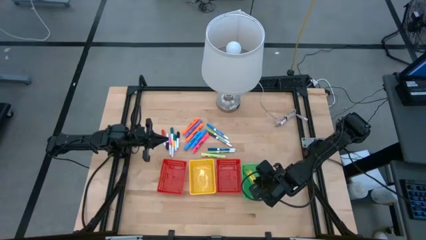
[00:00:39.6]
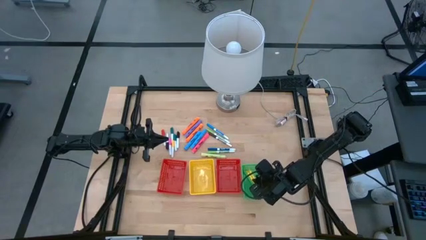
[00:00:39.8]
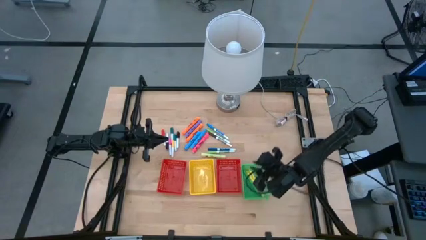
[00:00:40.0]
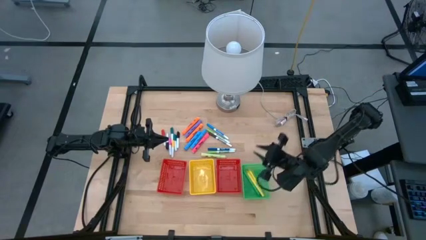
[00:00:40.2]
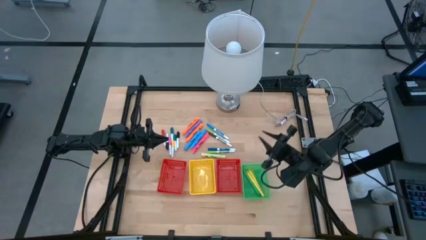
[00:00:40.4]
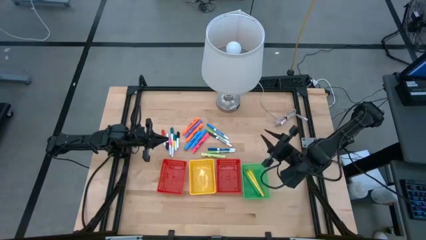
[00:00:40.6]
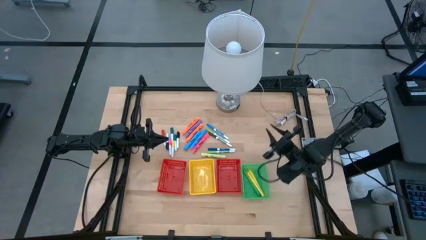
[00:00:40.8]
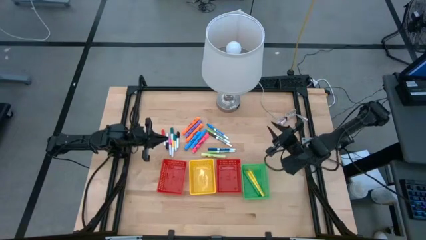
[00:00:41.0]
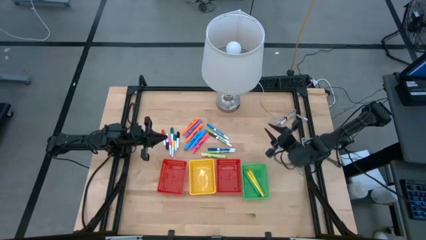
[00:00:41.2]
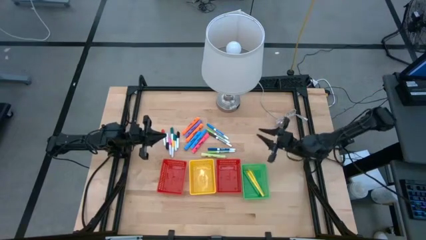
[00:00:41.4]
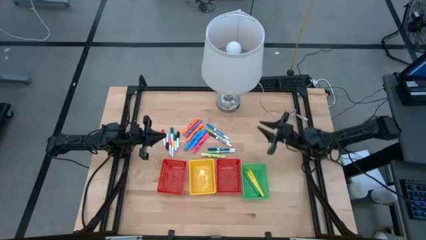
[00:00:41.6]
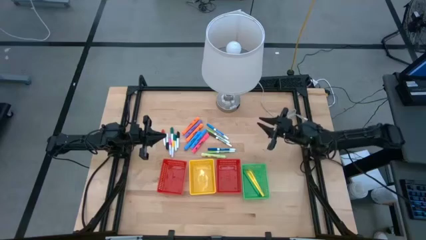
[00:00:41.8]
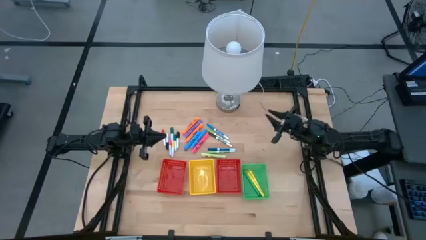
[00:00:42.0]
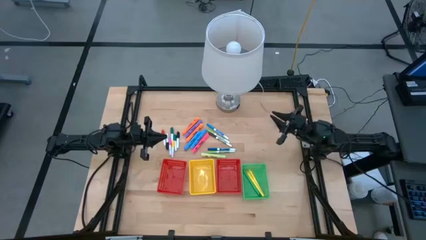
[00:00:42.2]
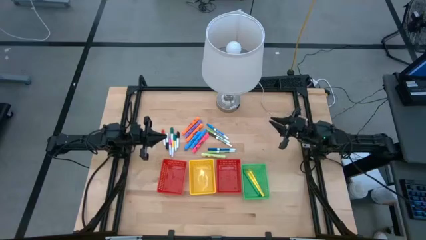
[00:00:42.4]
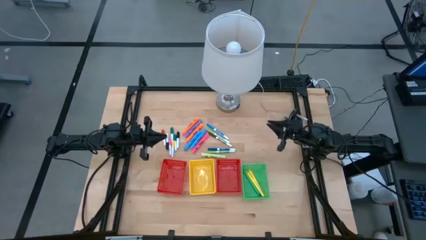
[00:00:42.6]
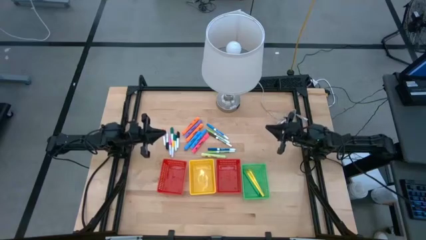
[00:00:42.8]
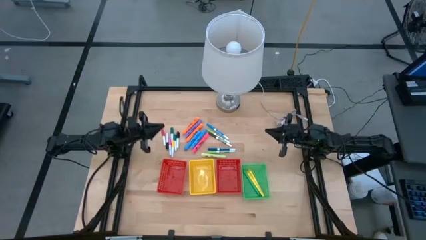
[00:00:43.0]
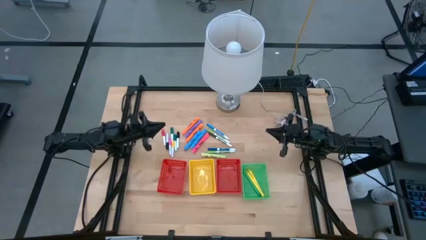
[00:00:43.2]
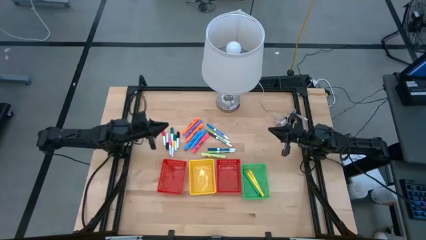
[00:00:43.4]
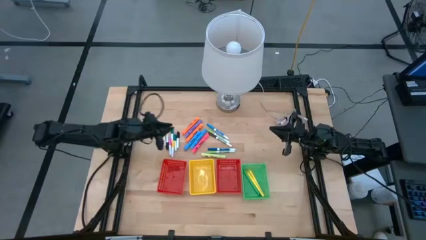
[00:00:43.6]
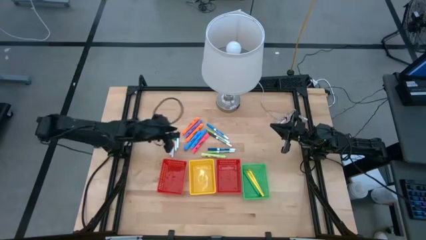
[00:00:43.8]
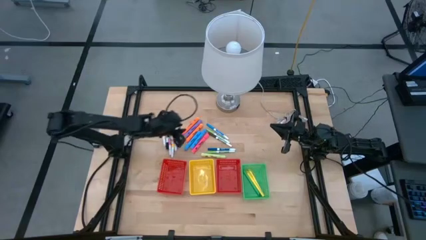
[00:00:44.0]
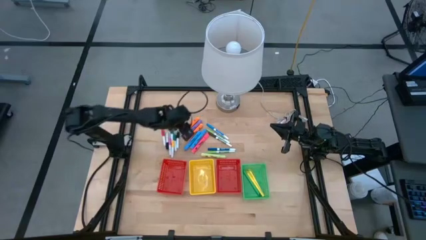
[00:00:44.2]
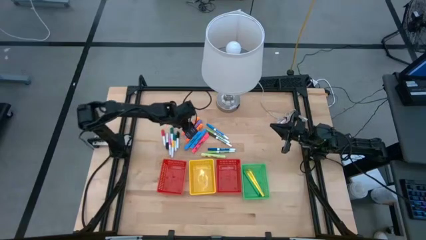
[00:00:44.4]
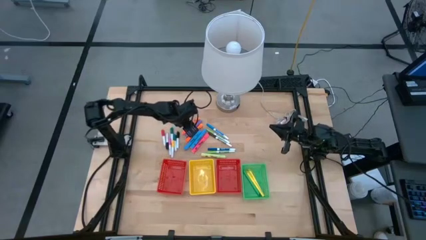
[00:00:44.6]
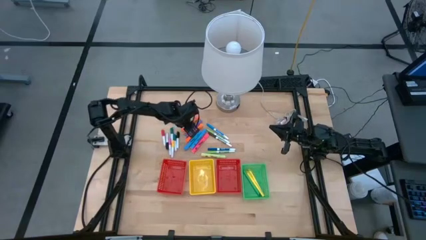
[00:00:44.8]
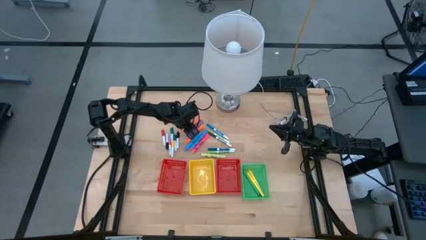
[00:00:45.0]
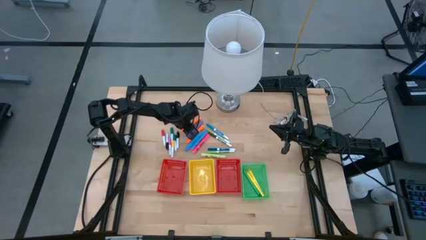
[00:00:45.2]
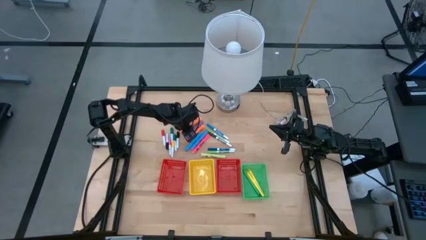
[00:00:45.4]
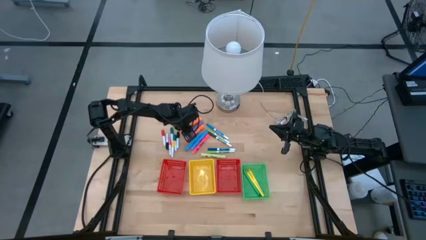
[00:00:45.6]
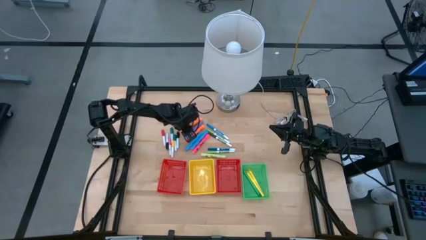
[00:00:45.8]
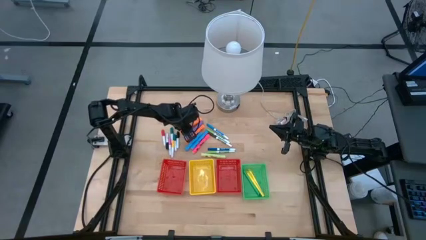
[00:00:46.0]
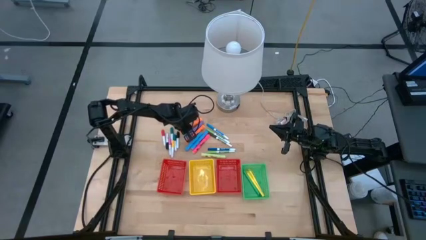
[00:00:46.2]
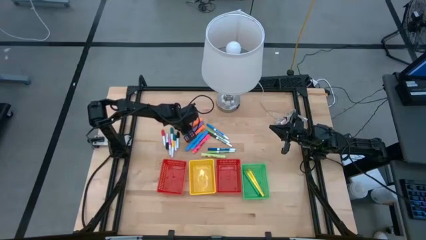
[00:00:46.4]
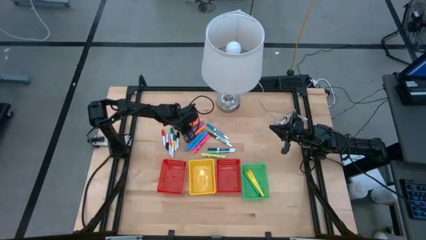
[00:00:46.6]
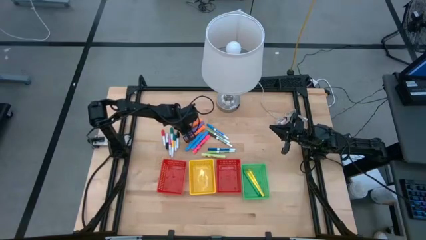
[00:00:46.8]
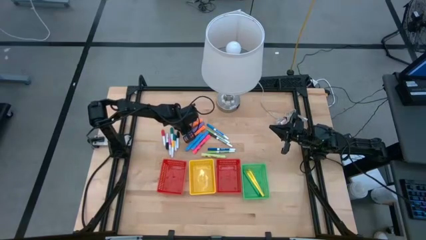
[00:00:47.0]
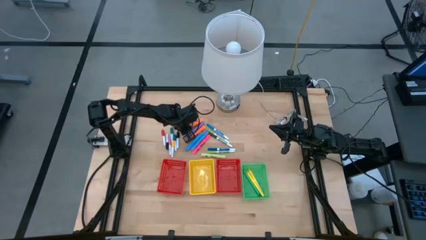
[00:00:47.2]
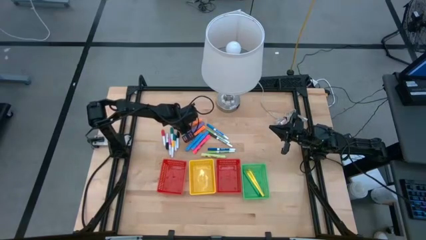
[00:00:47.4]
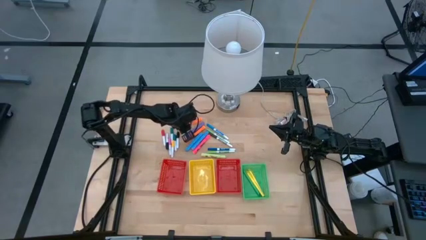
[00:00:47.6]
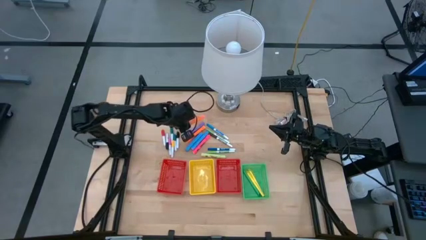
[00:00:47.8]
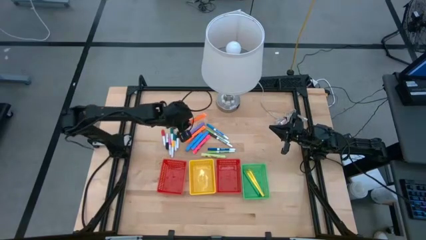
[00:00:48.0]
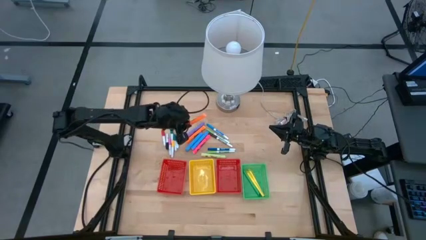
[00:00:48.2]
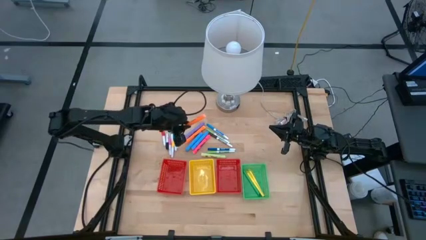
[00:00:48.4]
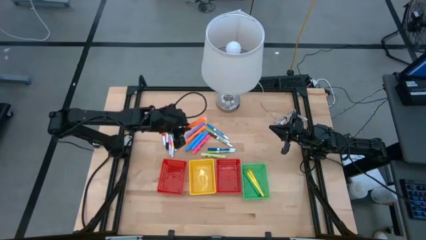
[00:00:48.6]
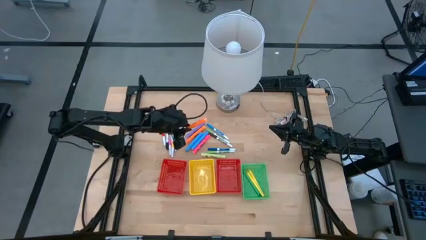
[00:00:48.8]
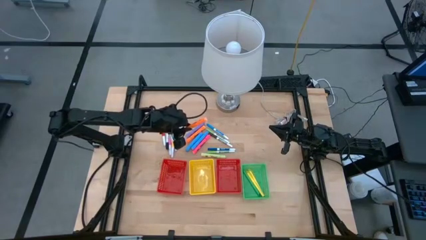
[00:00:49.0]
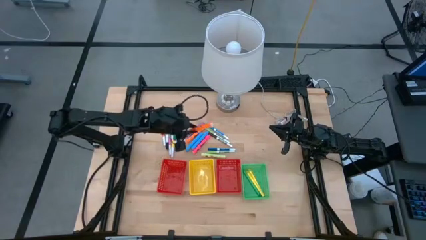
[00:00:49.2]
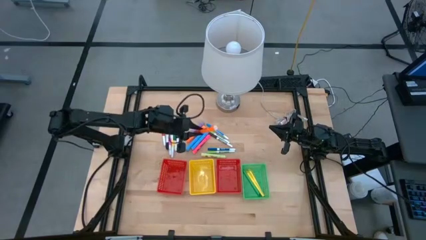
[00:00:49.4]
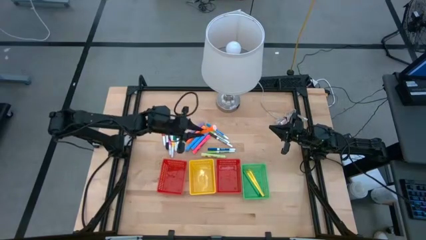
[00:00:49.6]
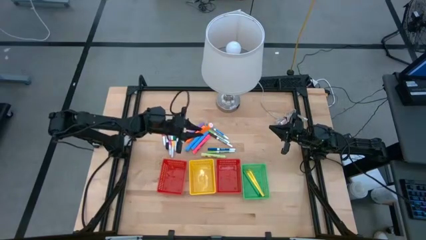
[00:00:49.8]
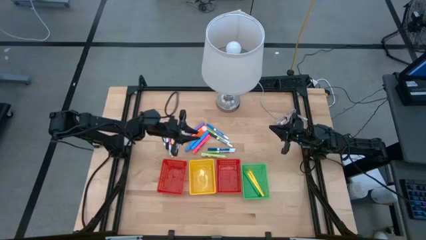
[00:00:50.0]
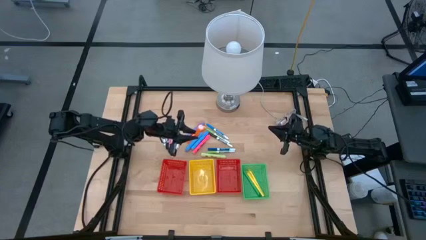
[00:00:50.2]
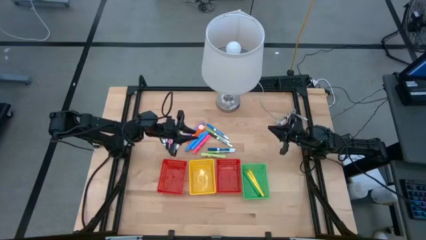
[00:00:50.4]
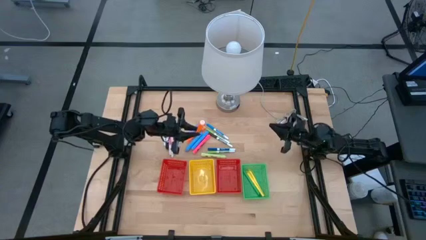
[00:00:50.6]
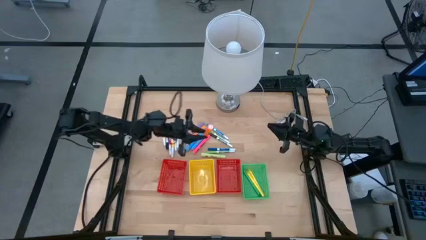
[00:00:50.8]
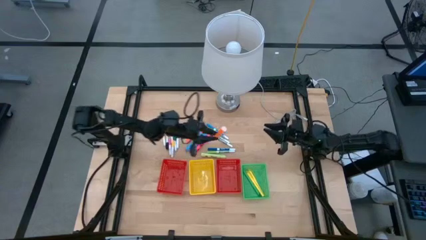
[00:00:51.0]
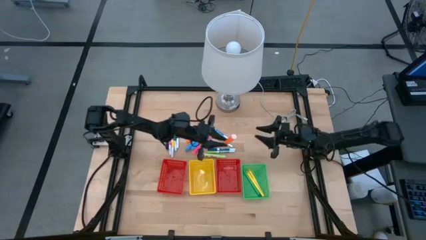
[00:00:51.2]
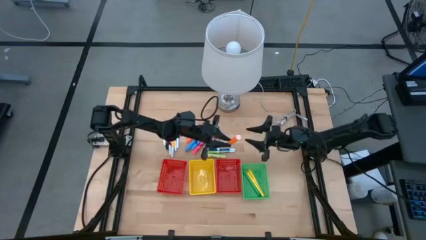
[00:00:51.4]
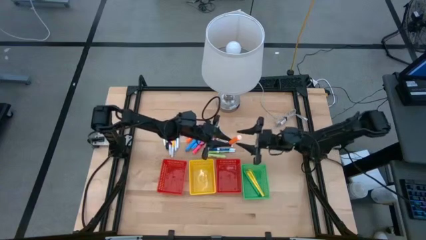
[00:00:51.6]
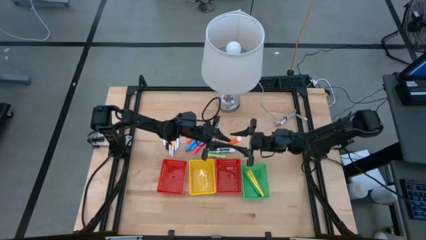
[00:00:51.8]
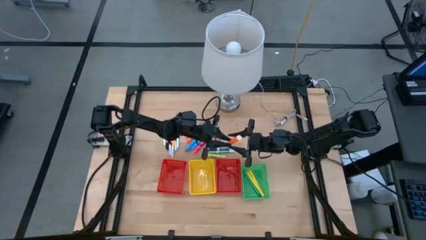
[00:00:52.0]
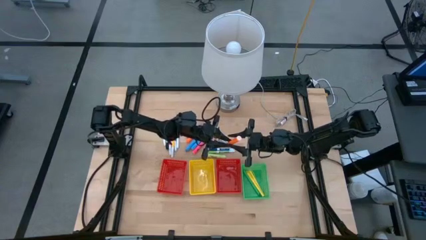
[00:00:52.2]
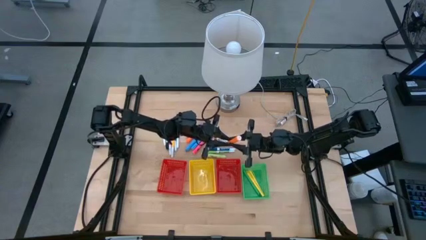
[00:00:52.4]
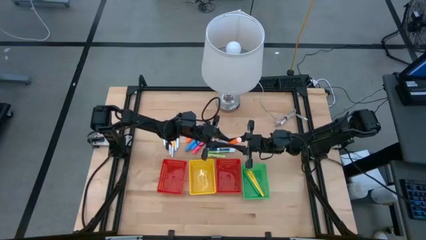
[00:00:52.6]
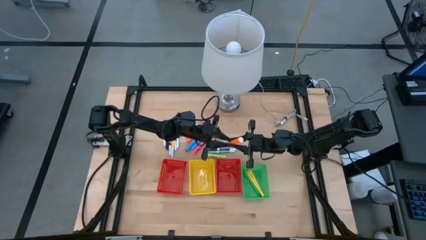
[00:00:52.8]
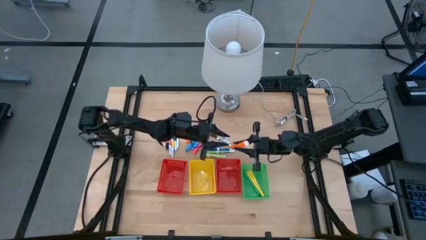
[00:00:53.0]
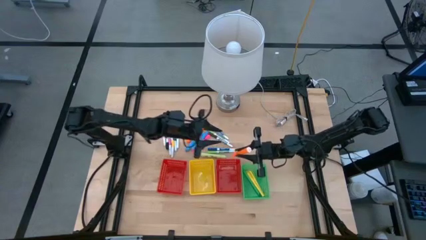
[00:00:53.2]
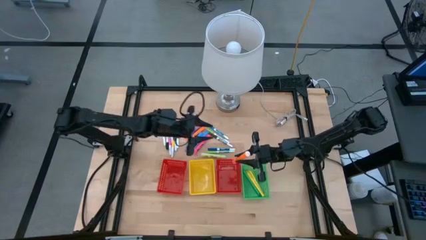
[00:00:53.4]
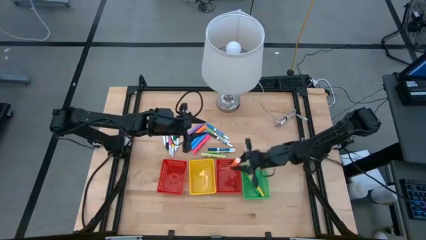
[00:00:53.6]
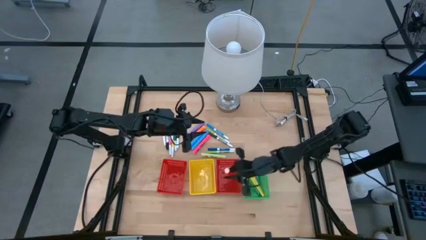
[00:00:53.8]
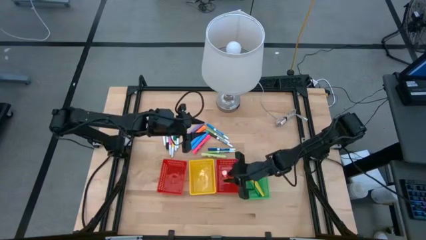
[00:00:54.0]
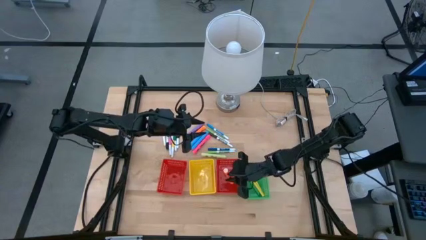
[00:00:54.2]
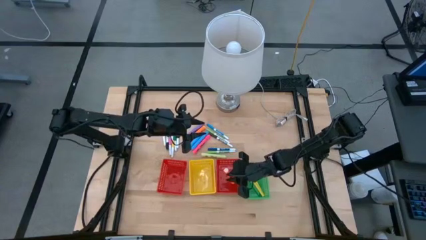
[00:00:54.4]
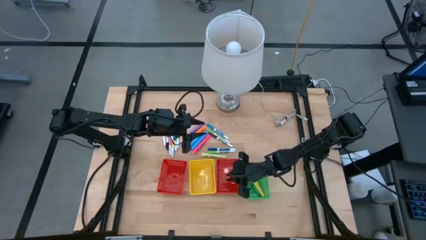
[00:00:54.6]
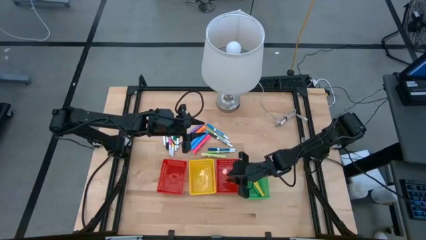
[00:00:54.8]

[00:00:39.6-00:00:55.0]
Task: Pick & Place Markers
Put the large orange highlighter into the right red bin
